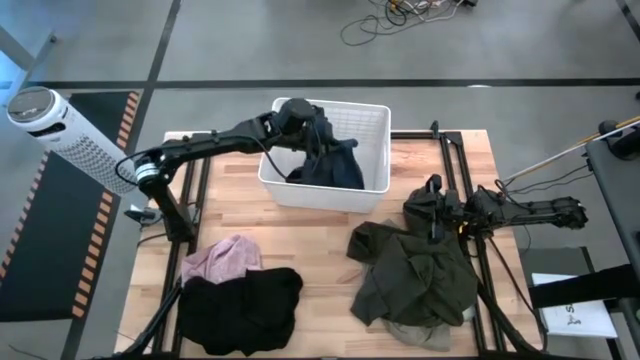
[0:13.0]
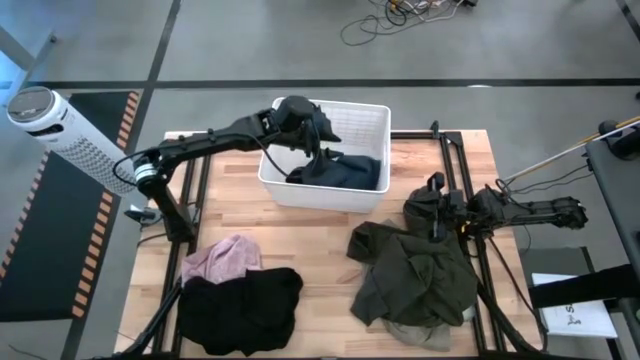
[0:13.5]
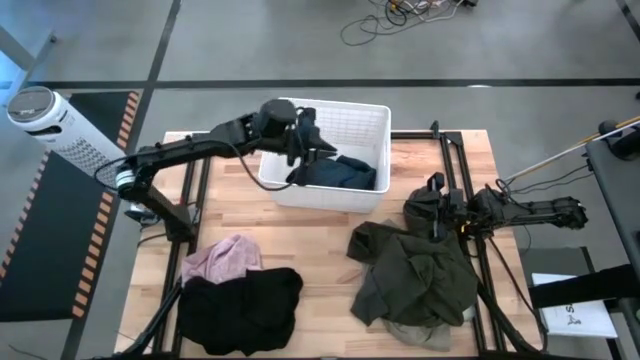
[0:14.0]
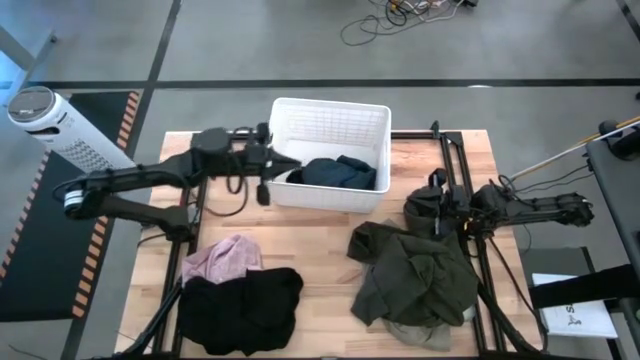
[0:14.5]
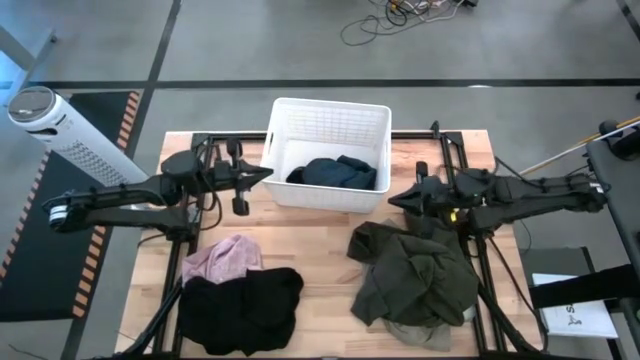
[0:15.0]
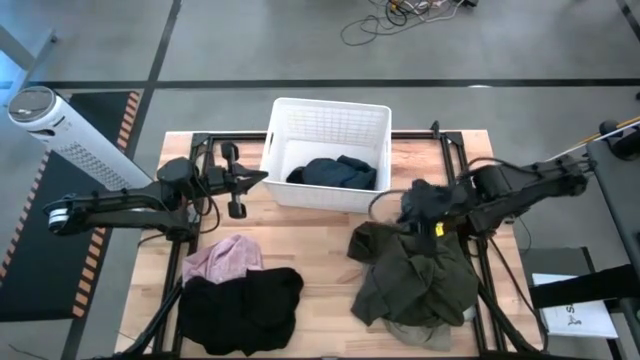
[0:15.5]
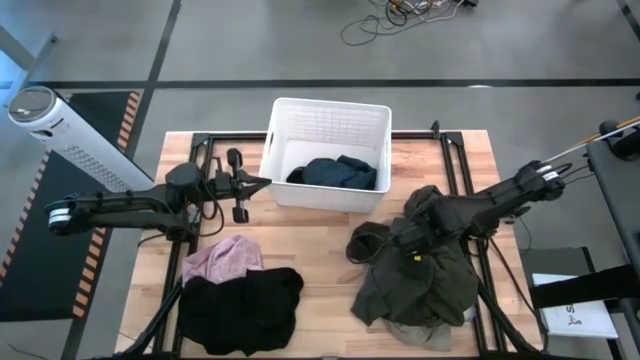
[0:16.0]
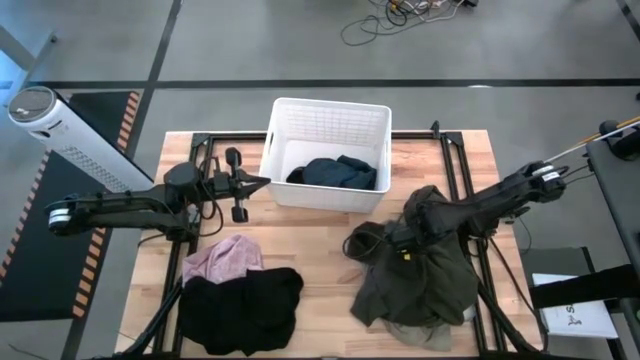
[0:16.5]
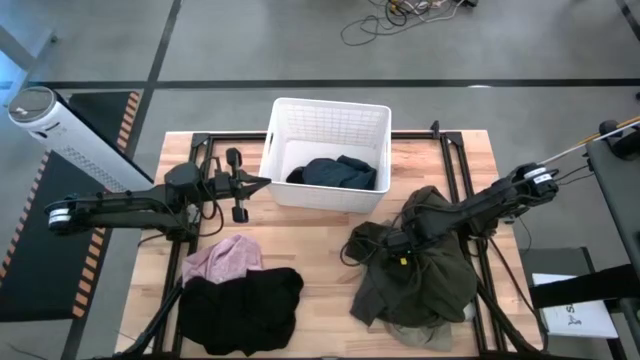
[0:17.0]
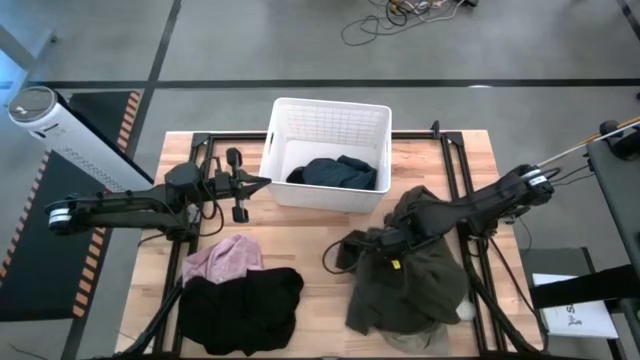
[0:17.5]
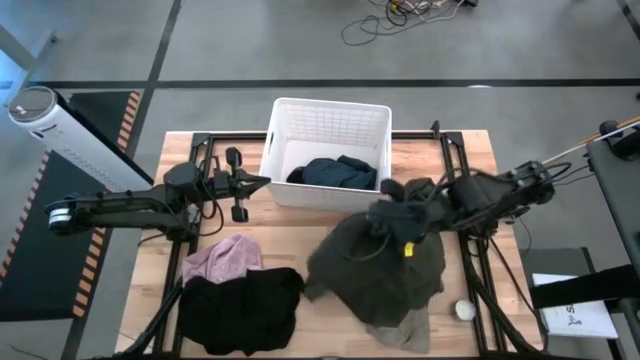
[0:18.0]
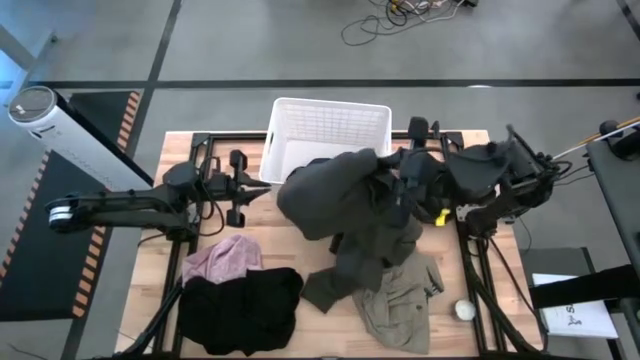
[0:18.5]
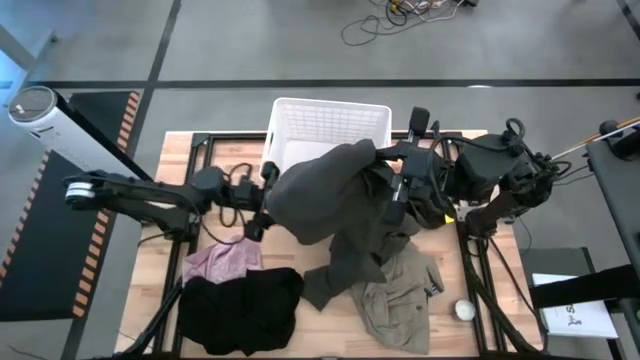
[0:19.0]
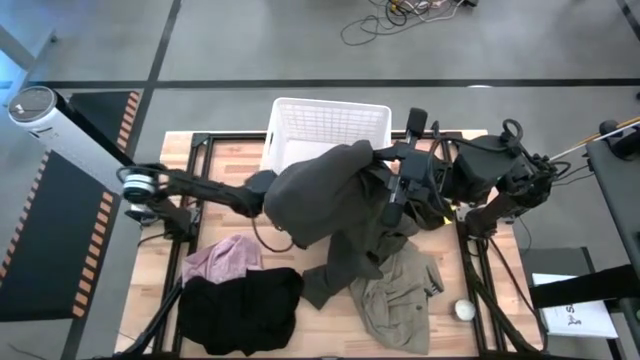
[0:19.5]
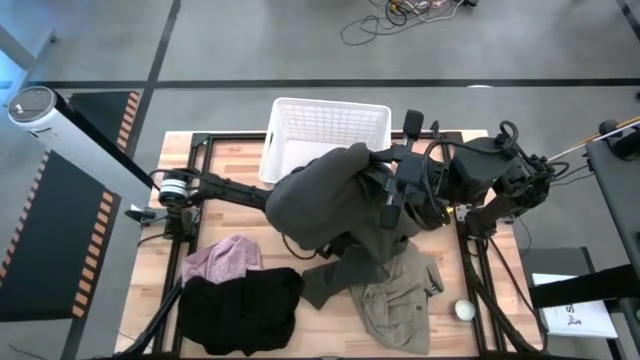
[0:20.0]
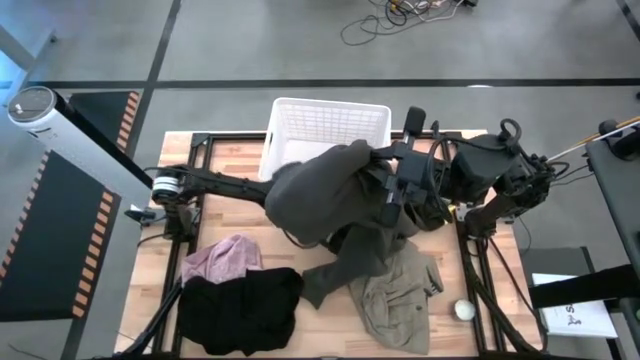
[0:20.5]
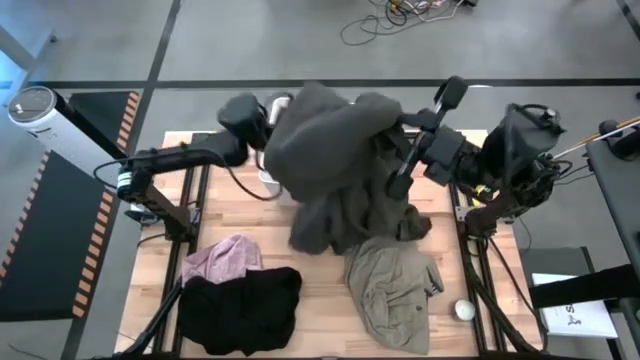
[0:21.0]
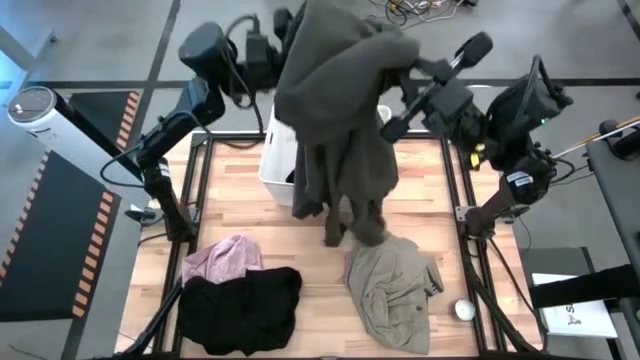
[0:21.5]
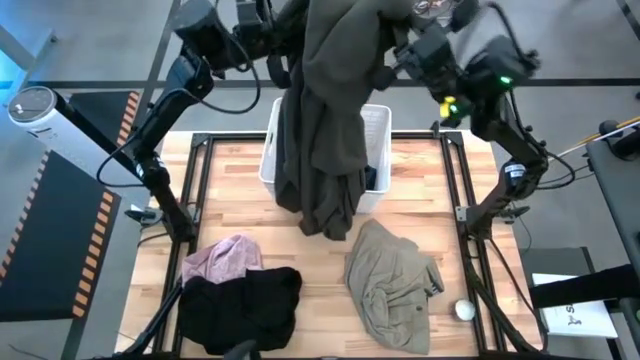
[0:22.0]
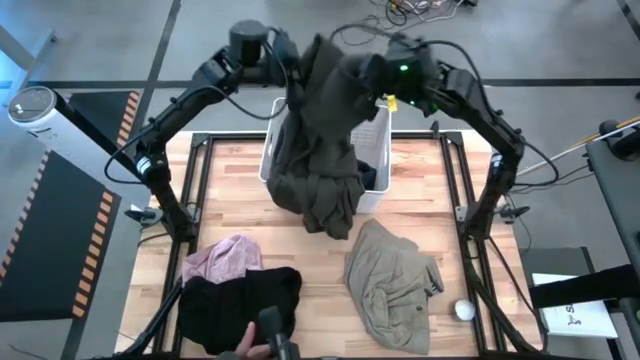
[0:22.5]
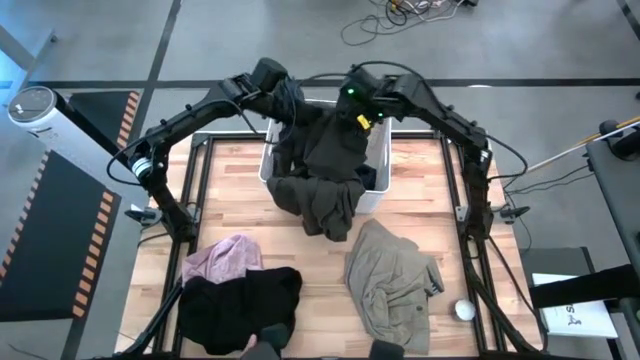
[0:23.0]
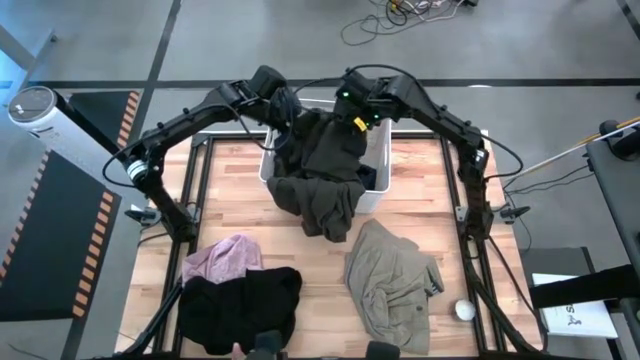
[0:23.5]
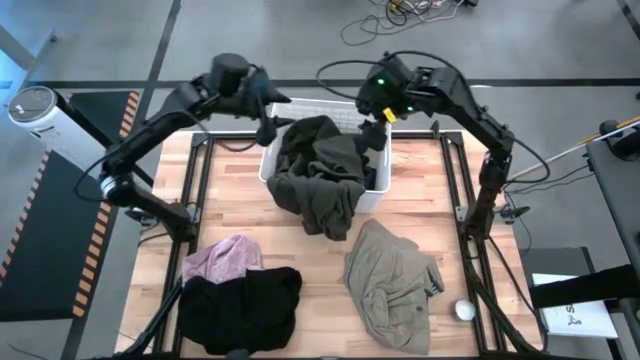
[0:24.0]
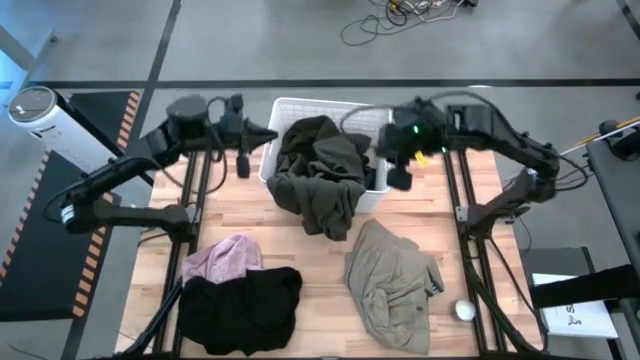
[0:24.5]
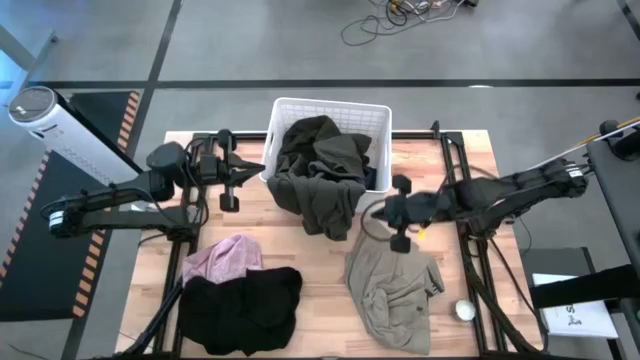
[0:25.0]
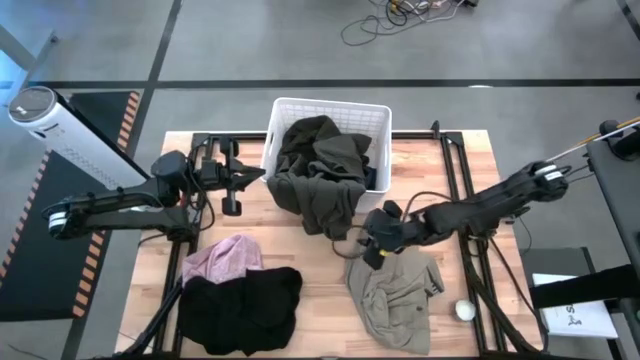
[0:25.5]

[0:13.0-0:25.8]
Task: Sort clothes
Put the hoodie jacket into the laundry bin
